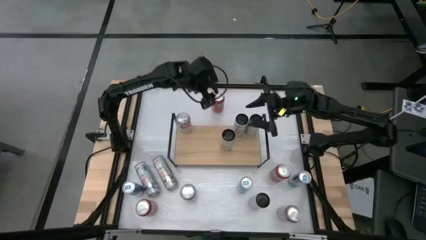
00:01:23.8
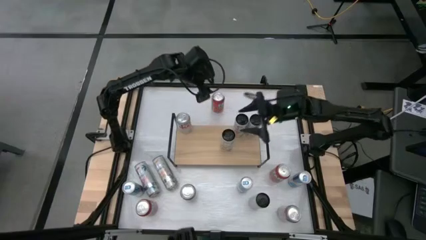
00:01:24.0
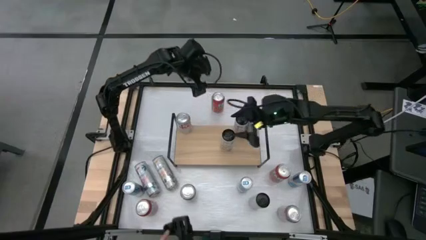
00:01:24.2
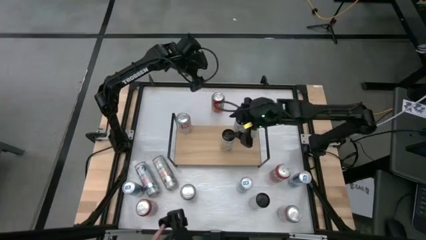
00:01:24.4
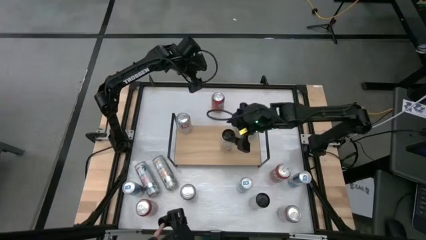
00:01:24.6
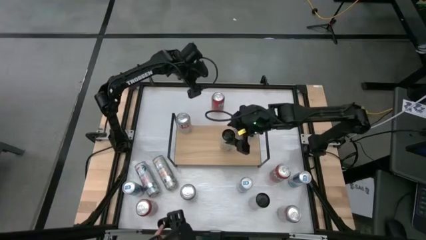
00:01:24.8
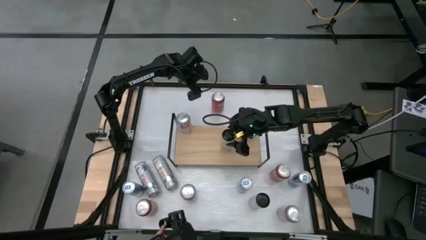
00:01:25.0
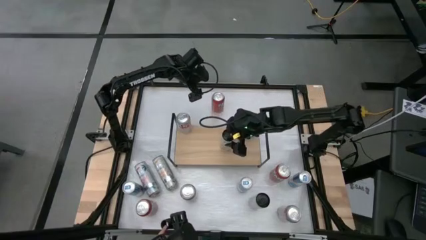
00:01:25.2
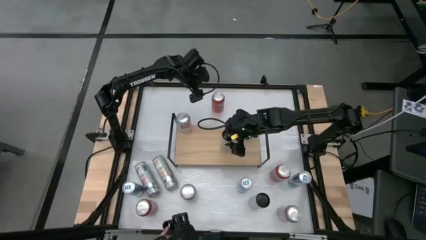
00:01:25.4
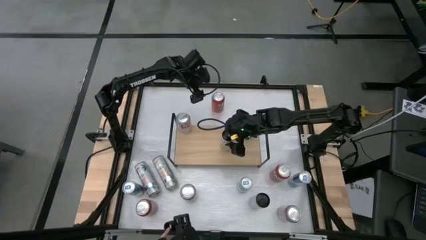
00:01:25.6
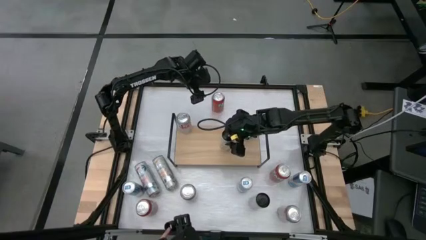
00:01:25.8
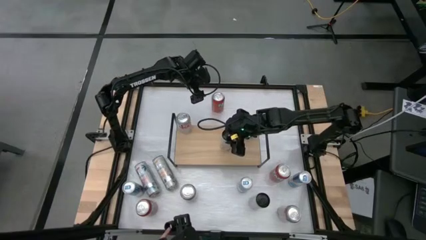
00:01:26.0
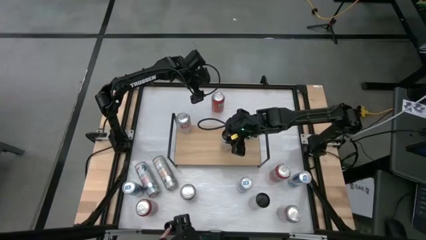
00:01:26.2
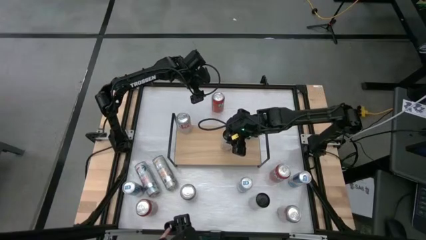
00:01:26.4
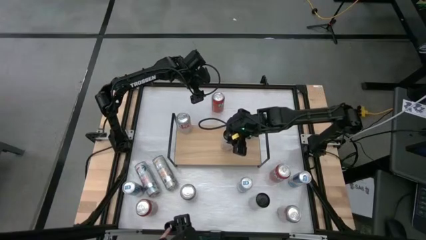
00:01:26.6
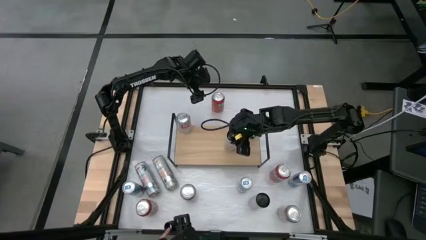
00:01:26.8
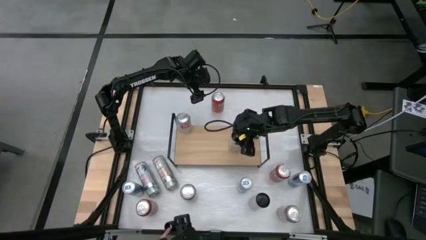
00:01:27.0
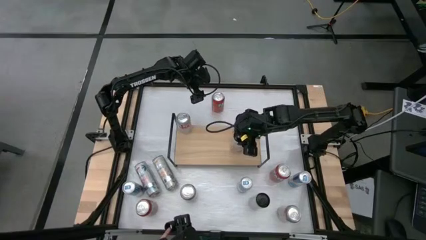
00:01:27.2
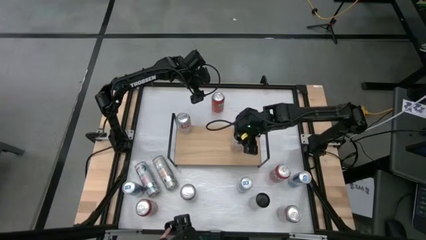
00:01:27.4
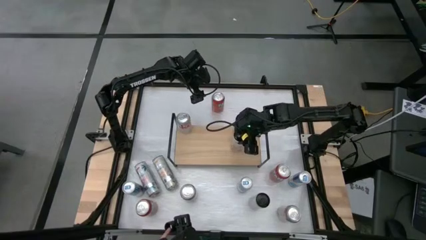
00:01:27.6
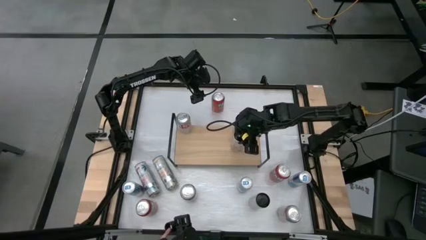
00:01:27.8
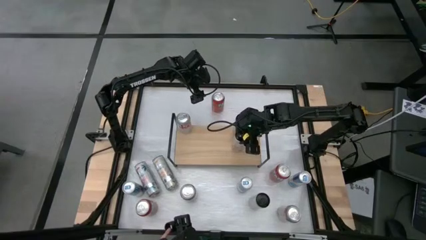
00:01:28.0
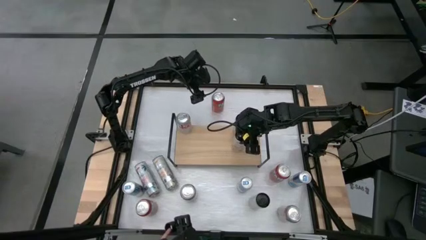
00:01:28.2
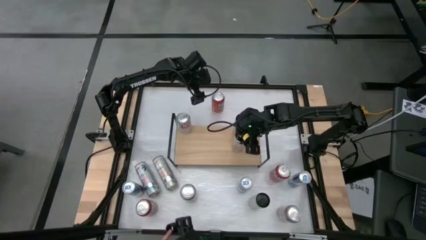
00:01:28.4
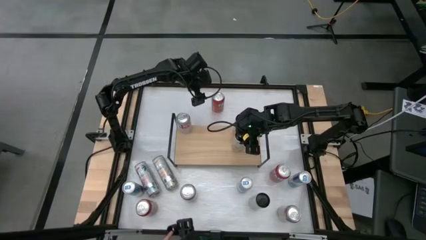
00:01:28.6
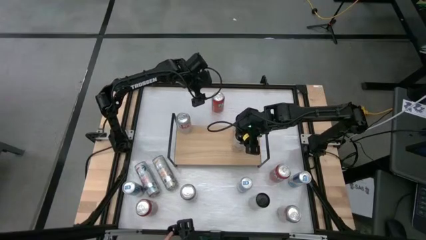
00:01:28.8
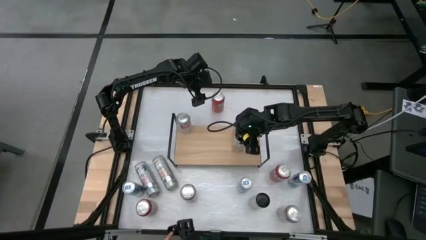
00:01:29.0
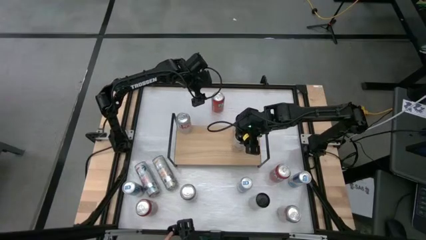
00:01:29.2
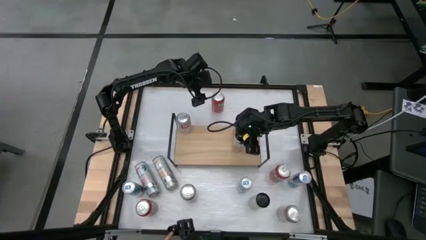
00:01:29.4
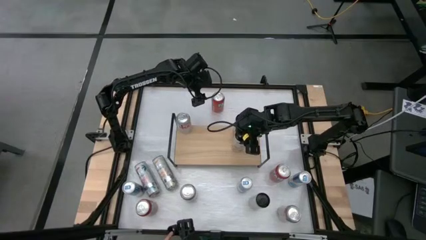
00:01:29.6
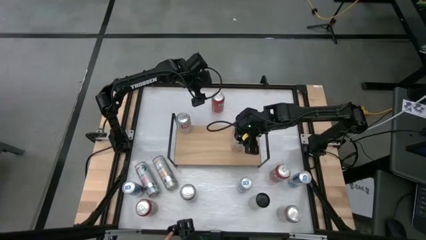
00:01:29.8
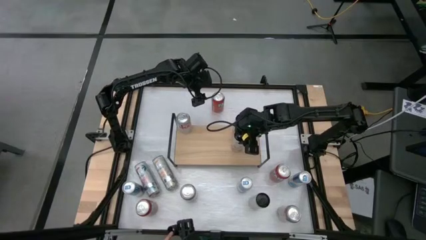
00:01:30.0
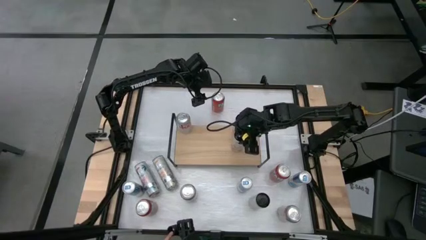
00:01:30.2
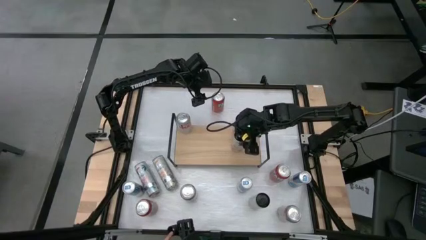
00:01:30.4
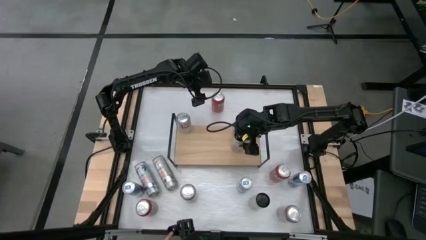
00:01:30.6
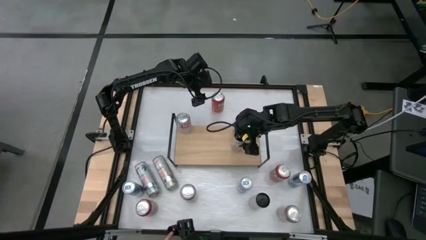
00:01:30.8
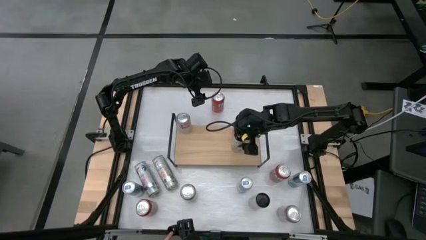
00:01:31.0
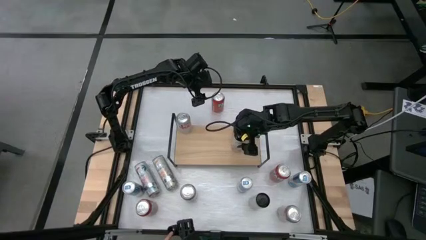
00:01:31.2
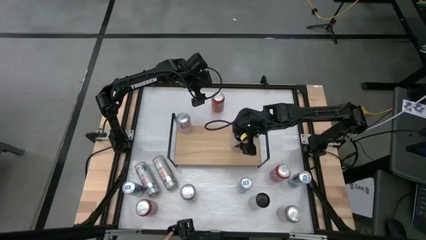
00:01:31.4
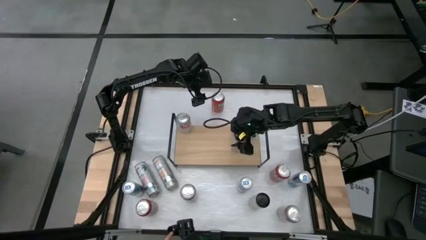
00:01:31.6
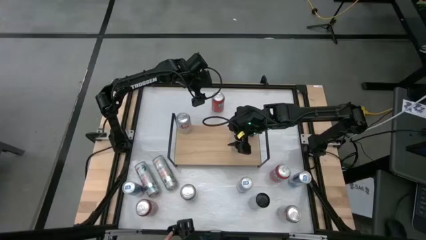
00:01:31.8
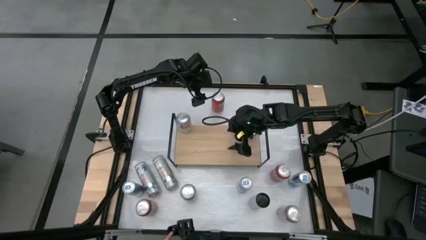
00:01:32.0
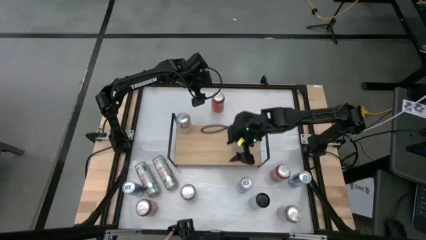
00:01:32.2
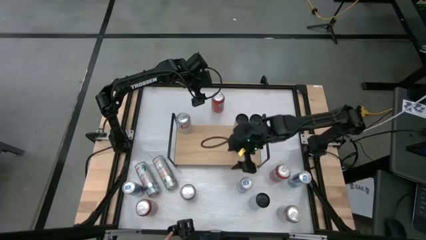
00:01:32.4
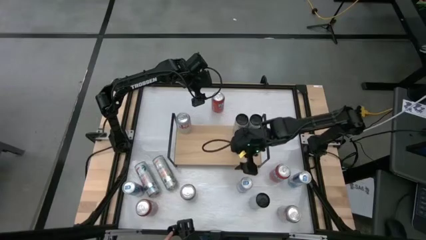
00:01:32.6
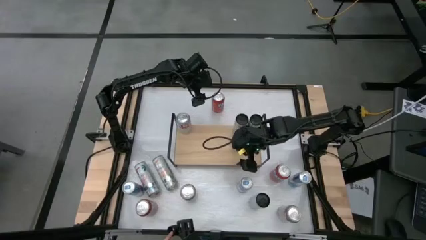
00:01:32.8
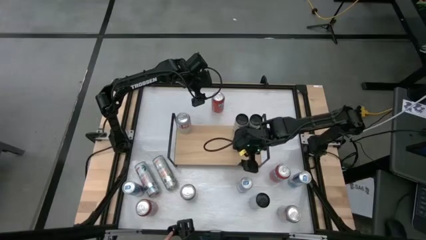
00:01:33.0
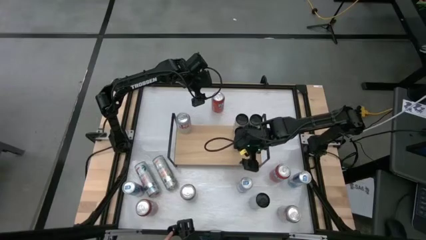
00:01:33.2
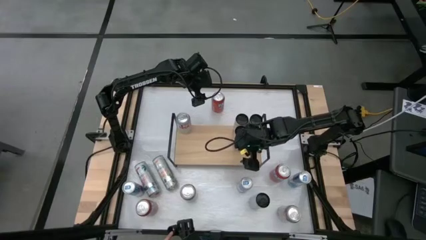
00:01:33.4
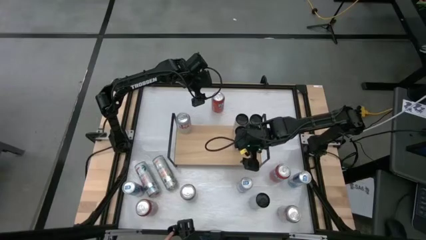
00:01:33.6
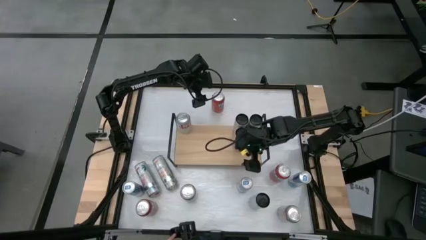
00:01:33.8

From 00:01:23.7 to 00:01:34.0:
Task: Place canned beverage on shelf
Put the top left white-pink soda can on the shelf aligned with other white-pink soda can
